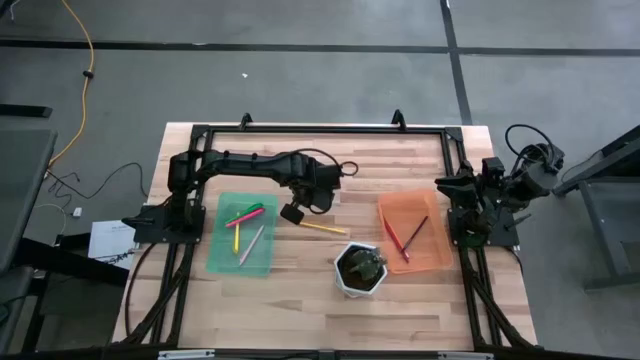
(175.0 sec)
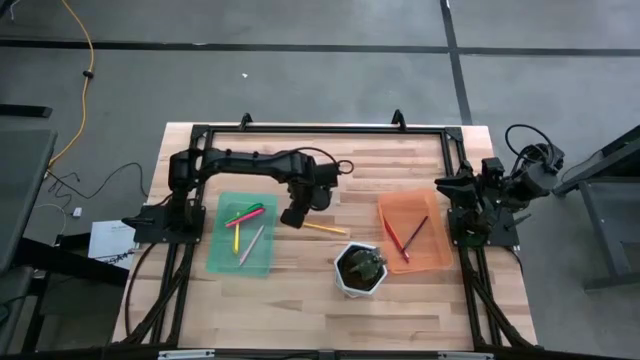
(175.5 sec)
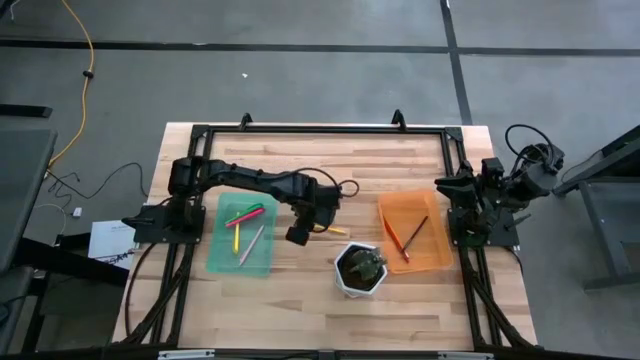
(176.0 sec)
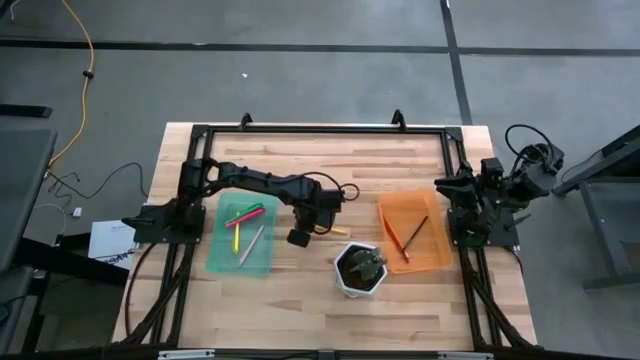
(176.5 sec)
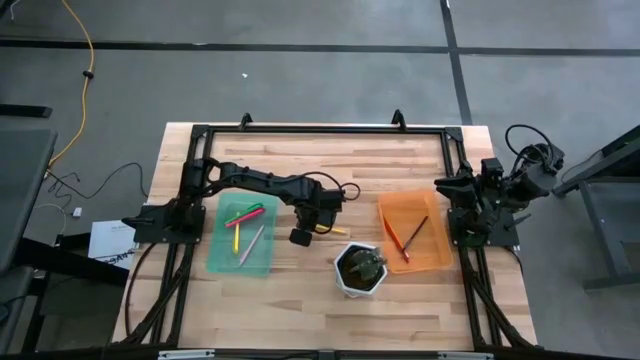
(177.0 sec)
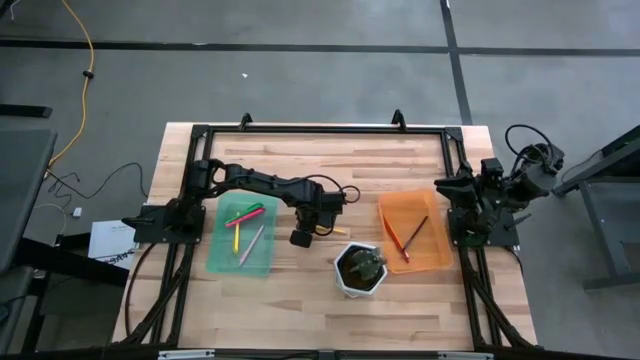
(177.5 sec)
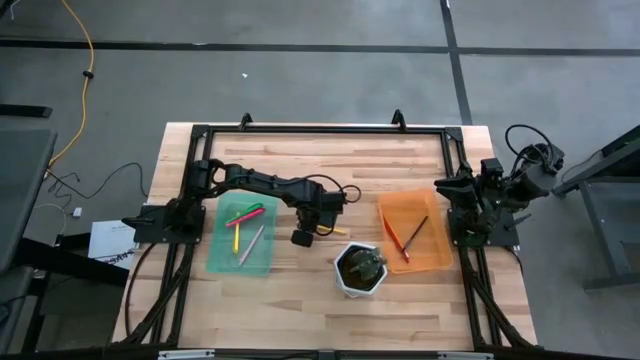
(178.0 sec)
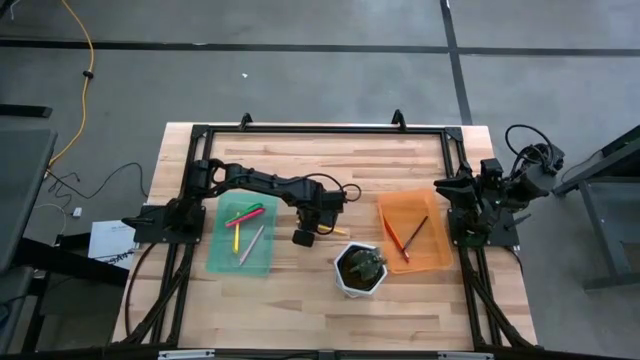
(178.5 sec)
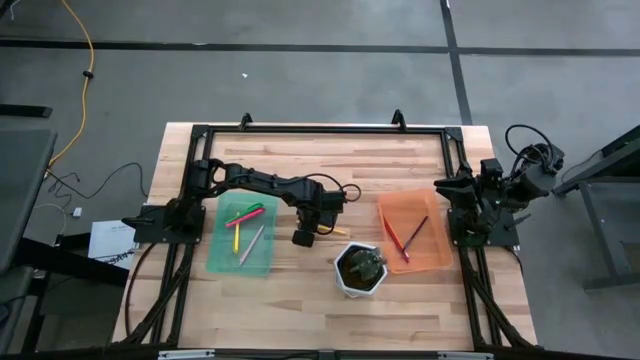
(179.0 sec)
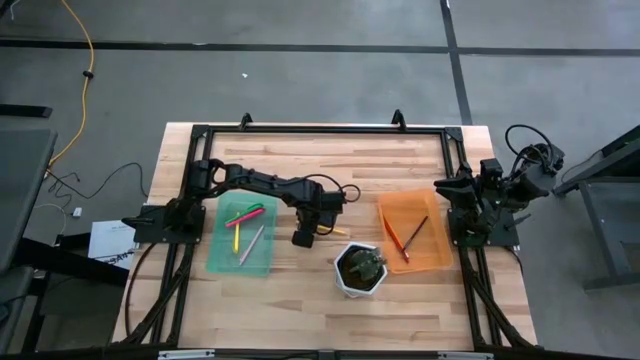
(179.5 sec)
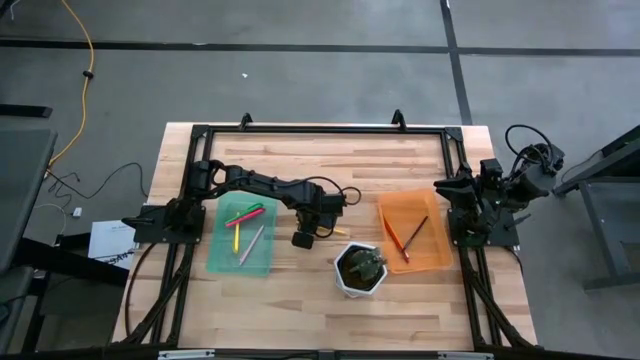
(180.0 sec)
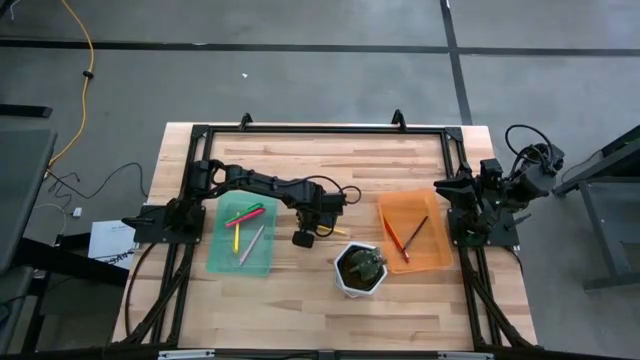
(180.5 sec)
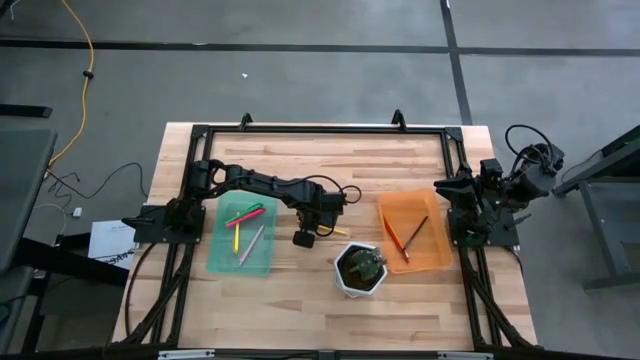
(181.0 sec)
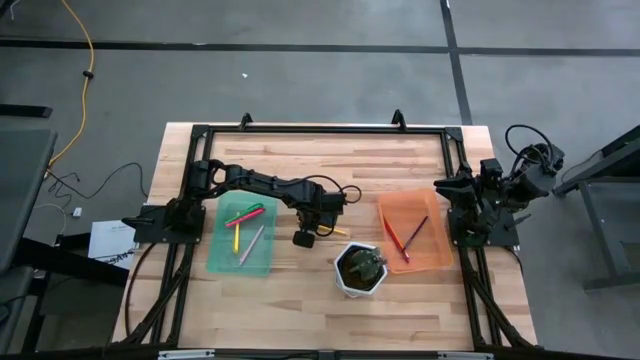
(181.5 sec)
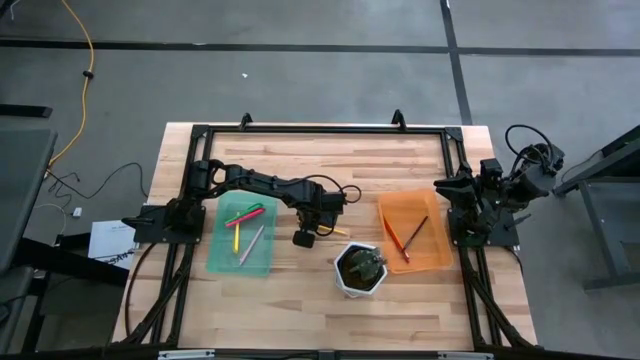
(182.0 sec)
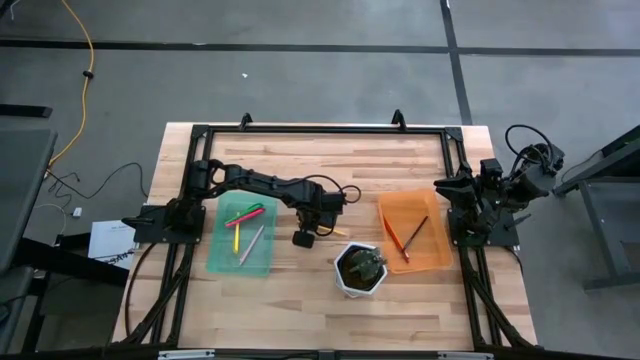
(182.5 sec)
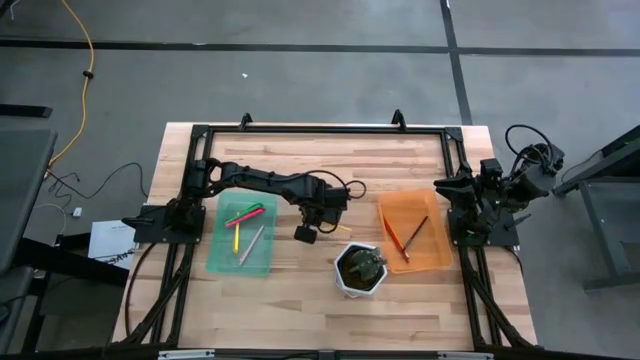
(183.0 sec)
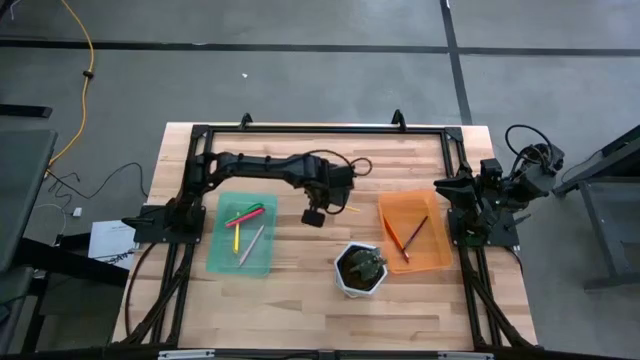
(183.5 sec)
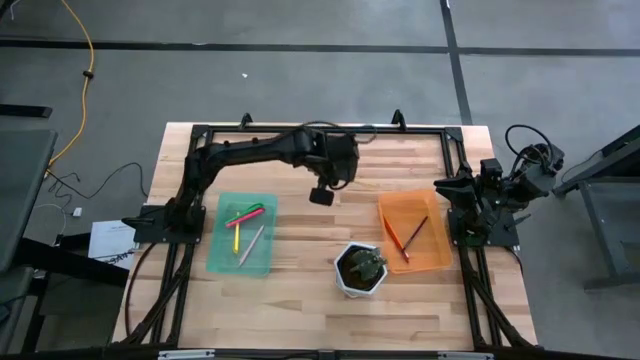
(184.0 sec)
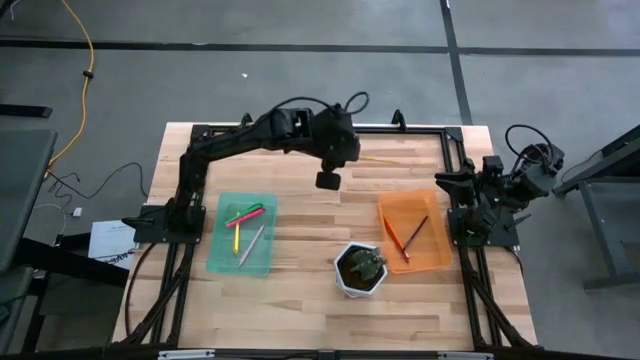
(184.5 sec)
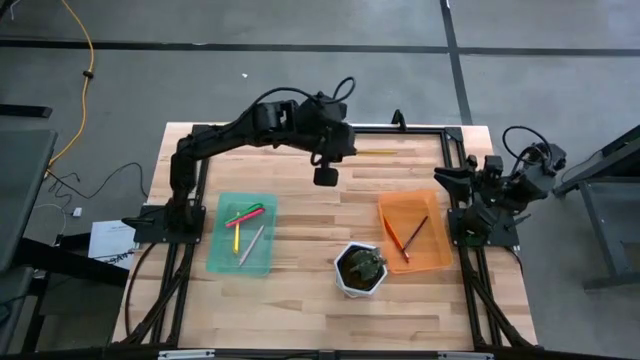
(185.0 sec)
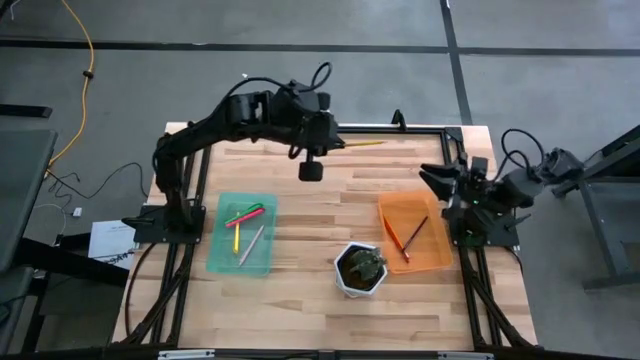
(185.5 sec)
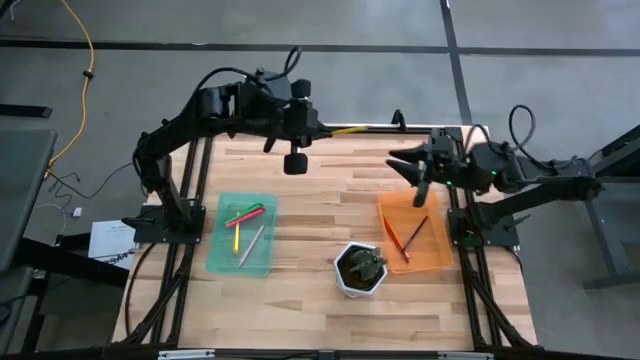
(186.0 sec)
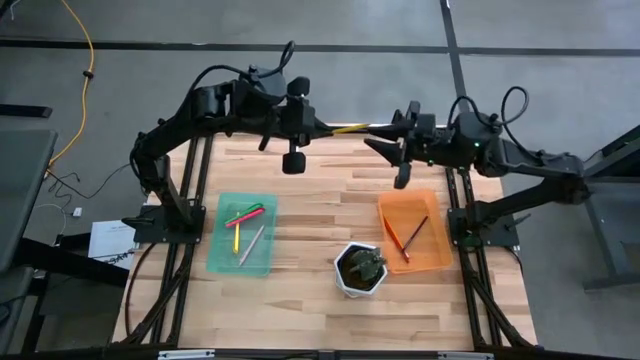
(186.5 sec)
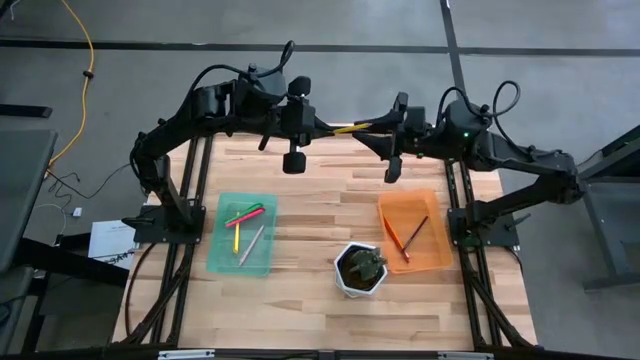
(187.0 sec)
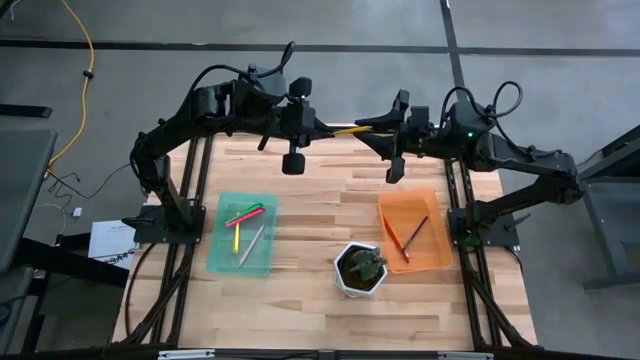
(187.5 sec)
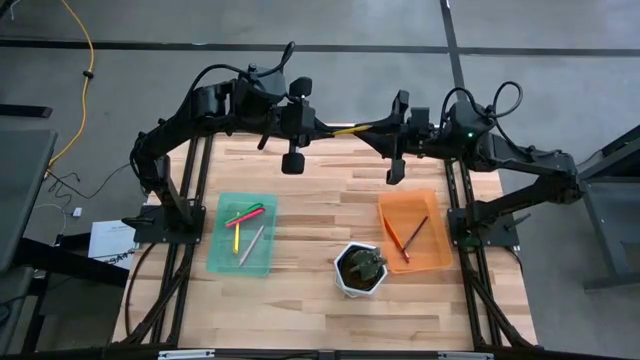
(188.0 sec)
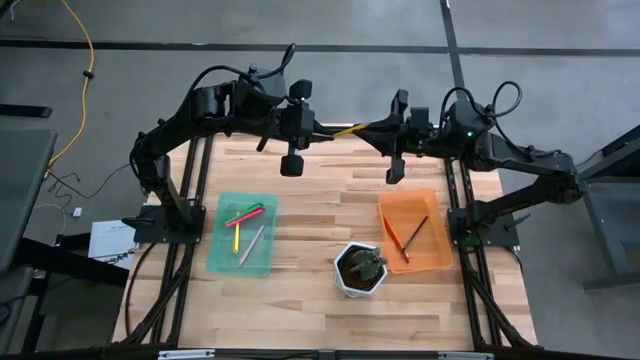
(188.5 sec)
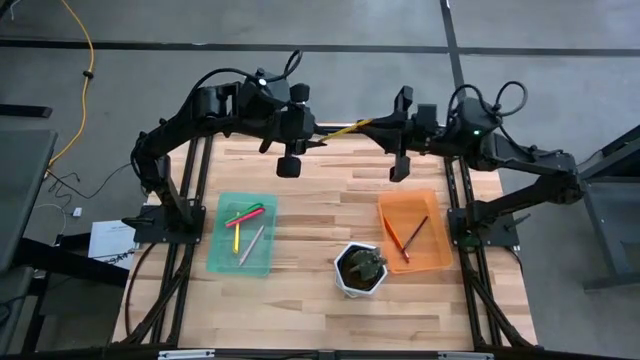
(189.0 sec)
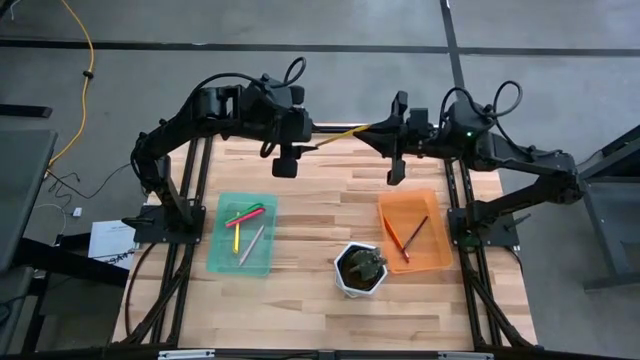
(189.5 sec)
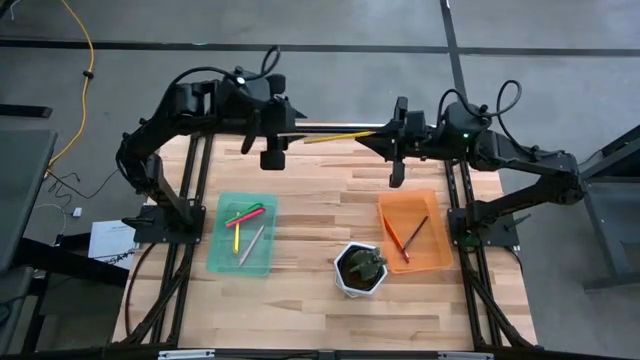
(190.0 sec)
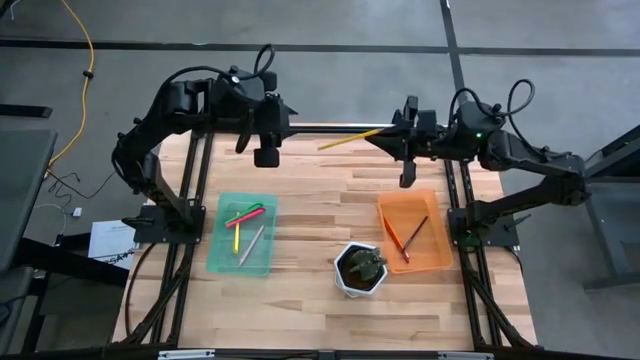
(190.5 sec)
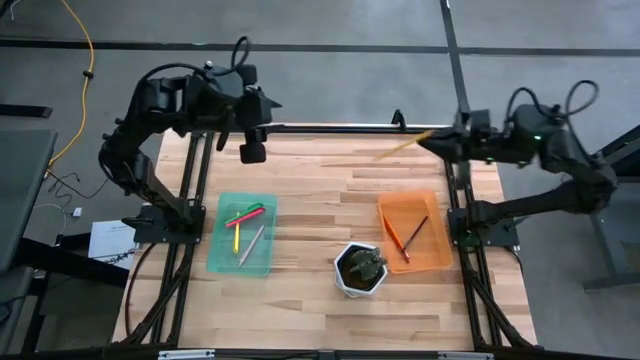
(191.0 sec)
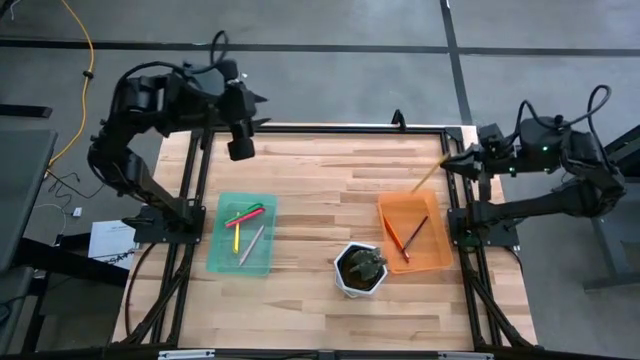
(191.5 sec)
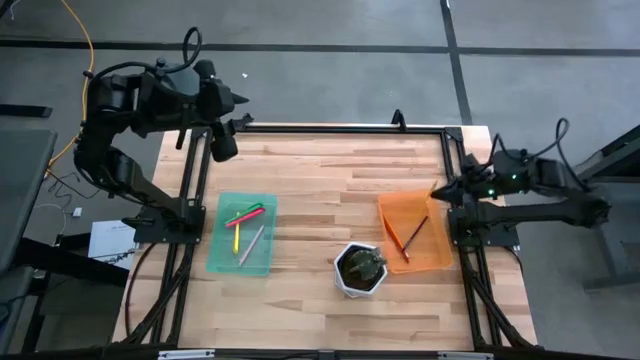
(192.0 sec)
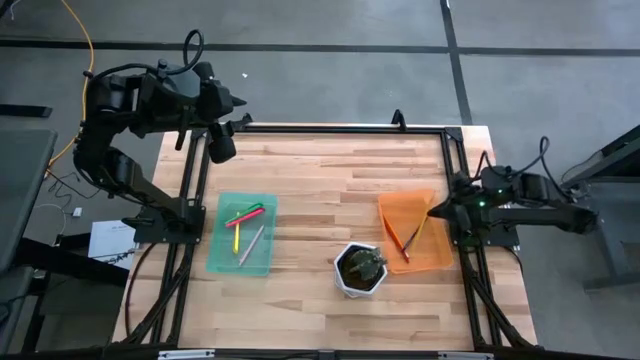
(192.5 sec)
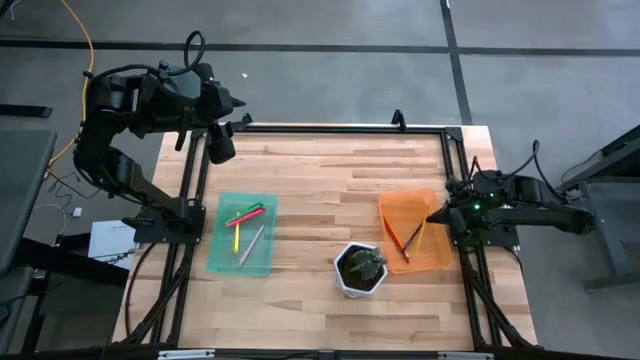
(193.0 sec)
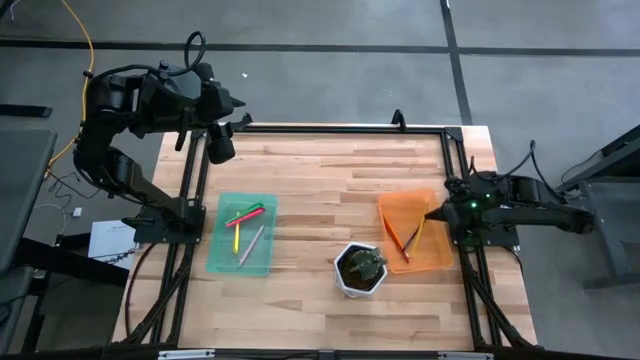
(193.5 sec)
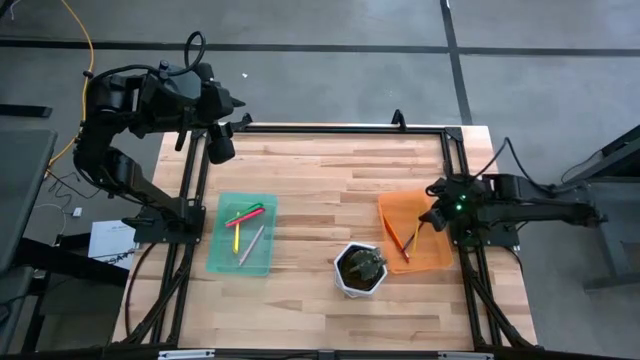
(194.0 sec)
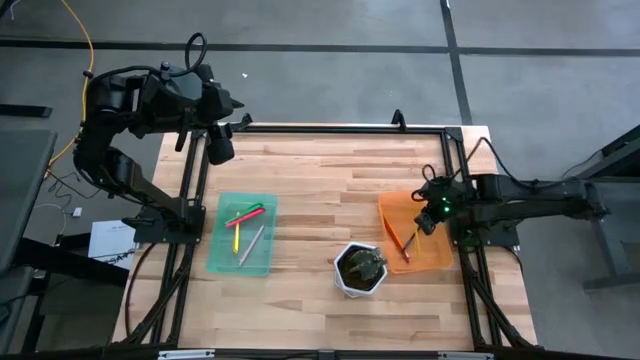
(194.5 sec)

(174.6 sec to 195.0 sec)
Task: Sort pens & pencils
Put the yellow pencil into the orange bin

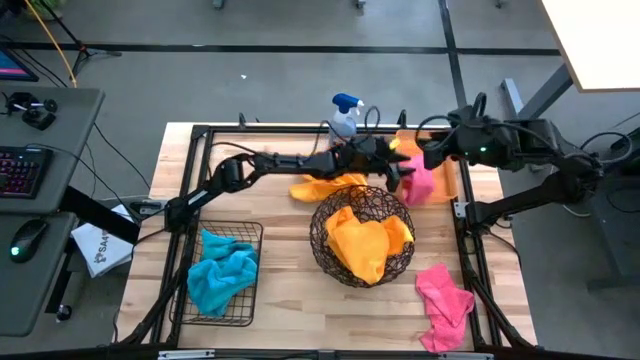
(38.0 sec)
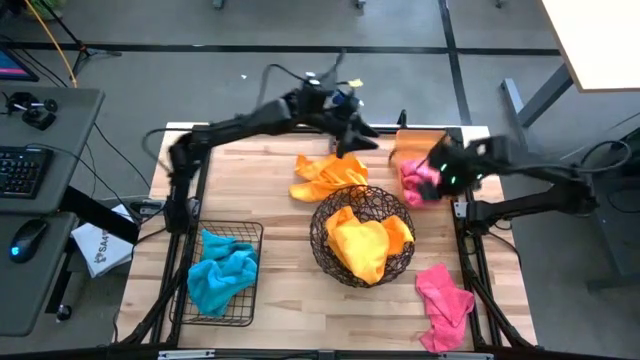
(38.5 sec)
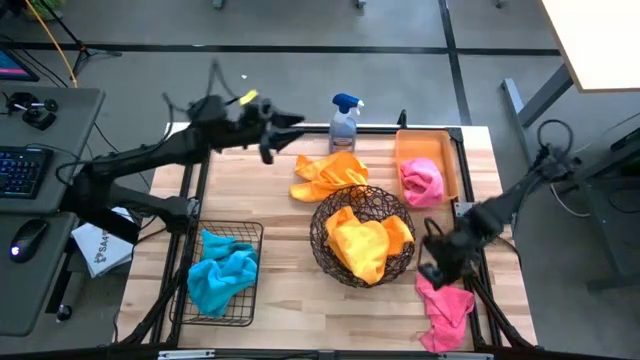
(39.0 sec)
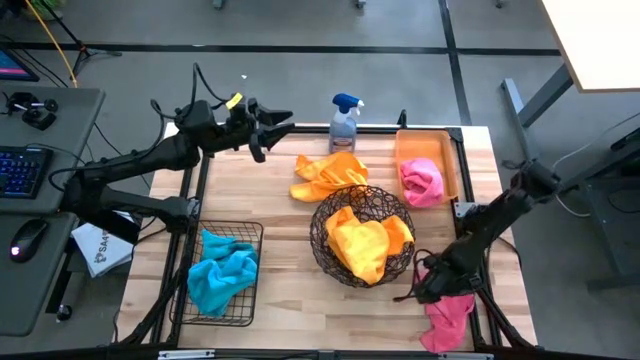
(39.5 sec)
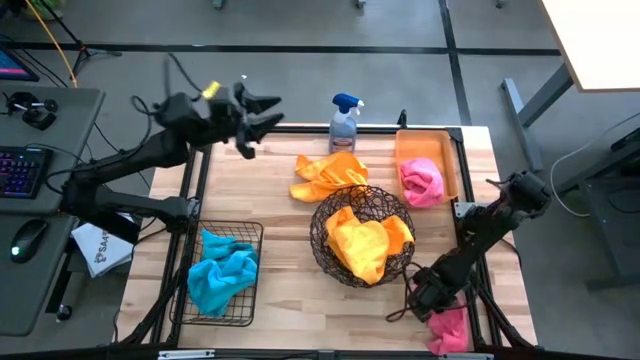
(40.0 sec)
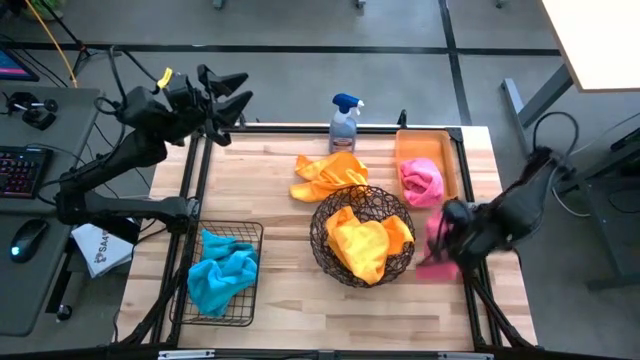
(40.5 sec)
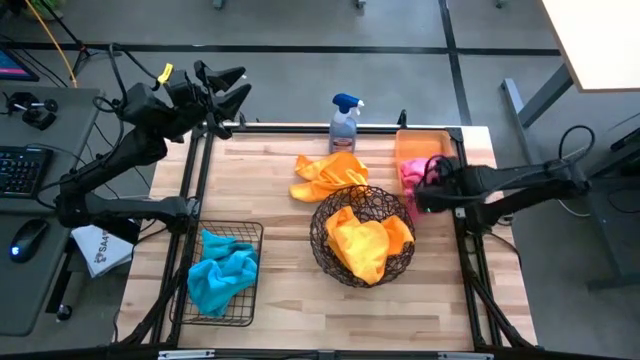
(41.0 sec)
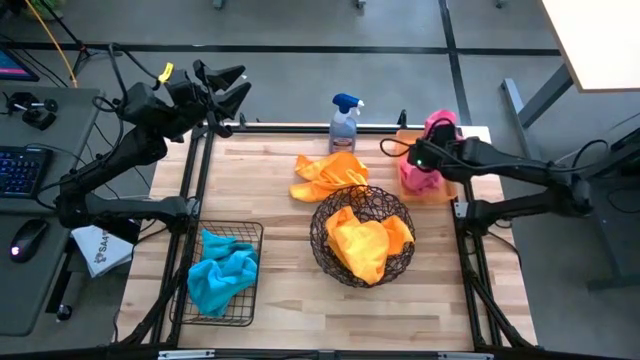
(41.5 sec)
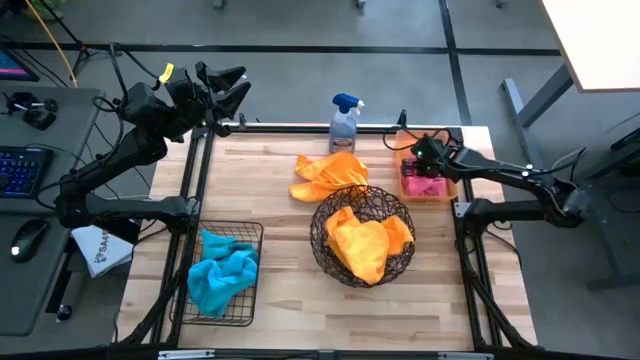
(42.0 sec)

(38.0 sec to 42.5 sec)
Task: Sort microfiber towel by color & place in baskets
Put the pink microfiber towel into the orange bin
